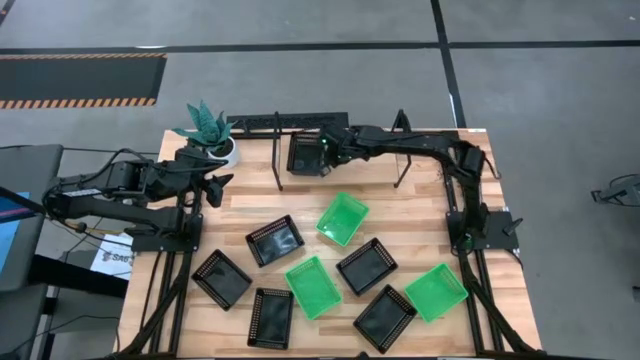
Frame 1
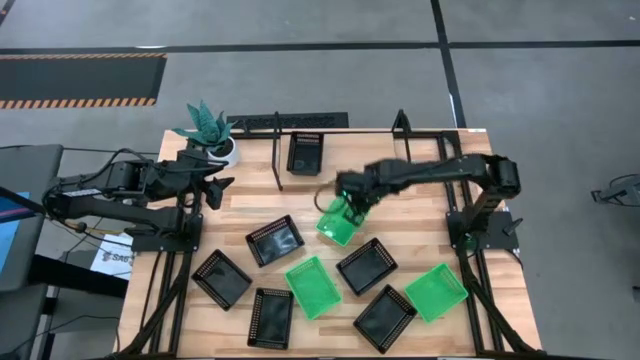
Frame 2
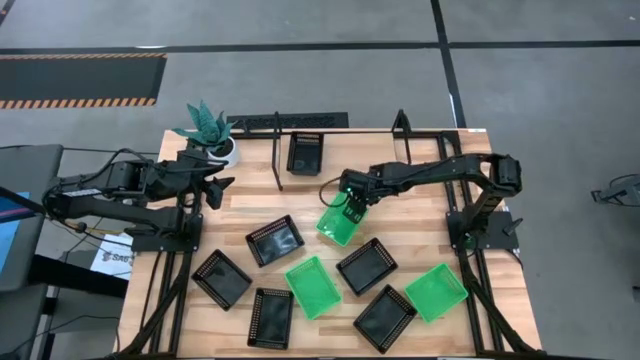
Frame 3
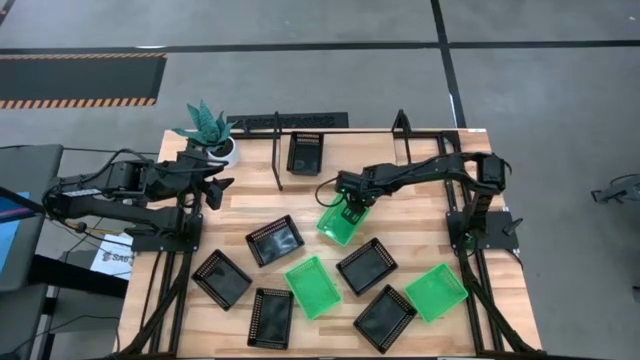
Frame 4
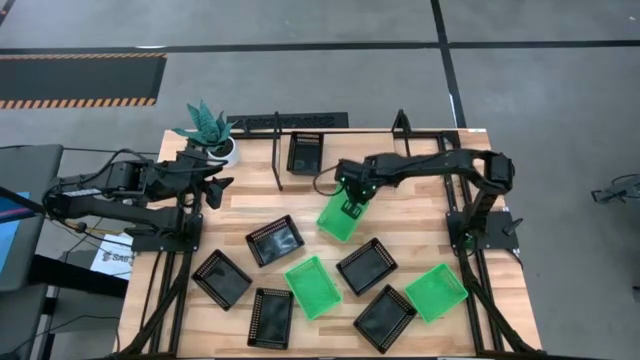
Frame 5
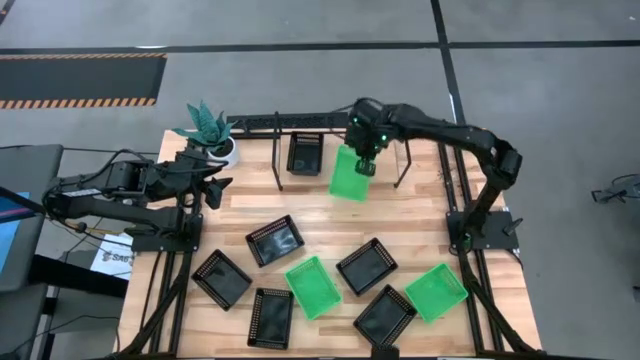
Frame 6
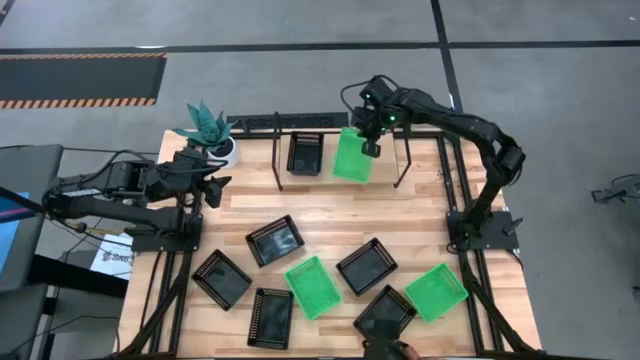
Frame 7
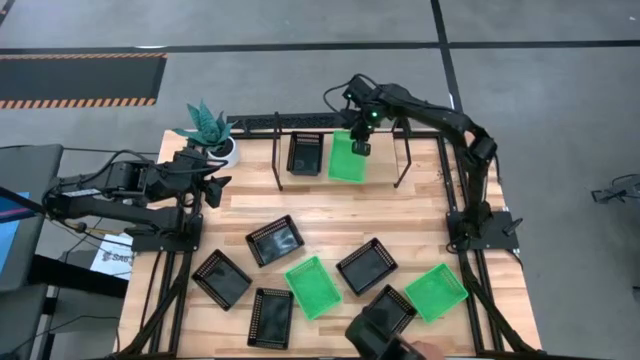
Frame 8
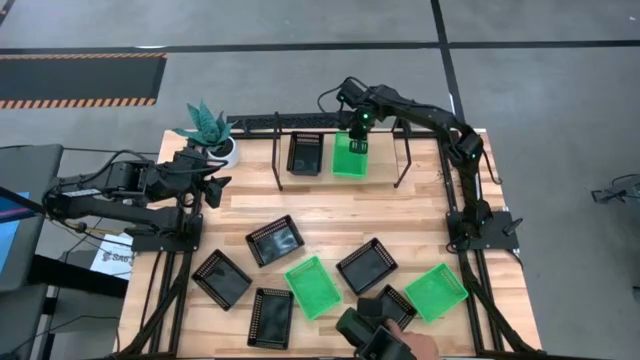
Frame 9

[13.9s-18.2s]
Task: Stack baskets on shelf by color
Put the green basket on the shelf

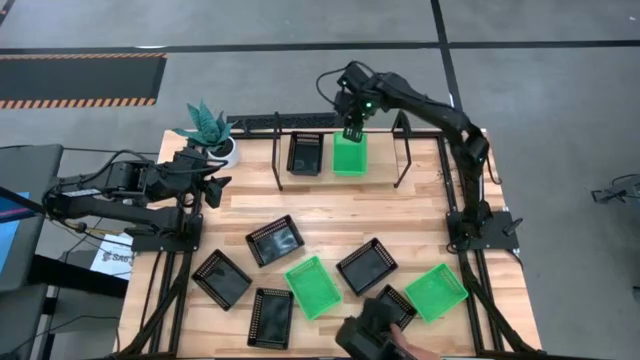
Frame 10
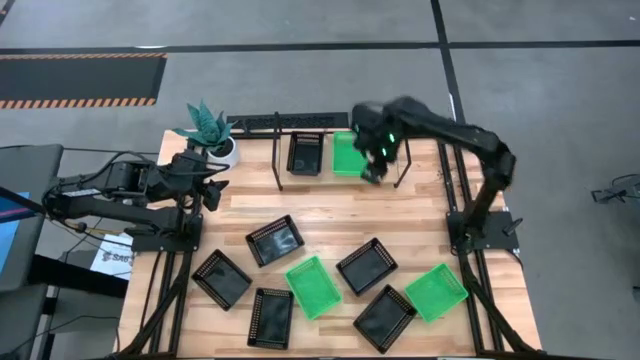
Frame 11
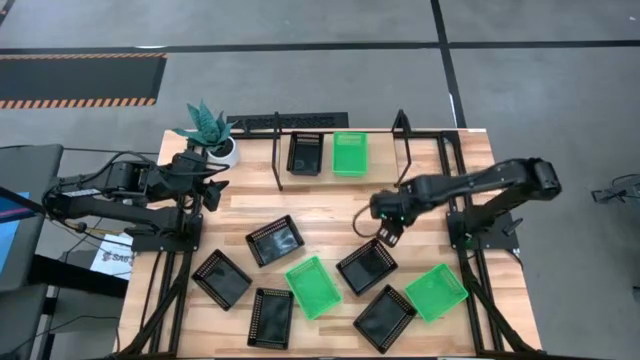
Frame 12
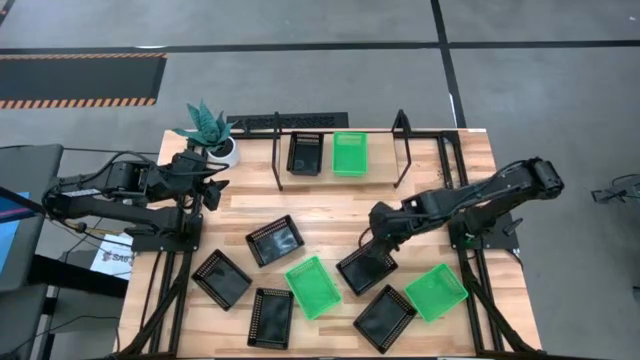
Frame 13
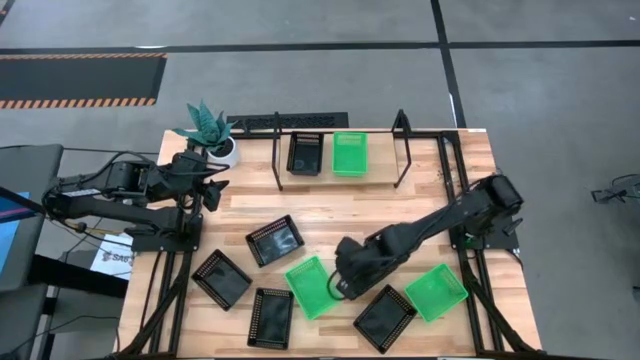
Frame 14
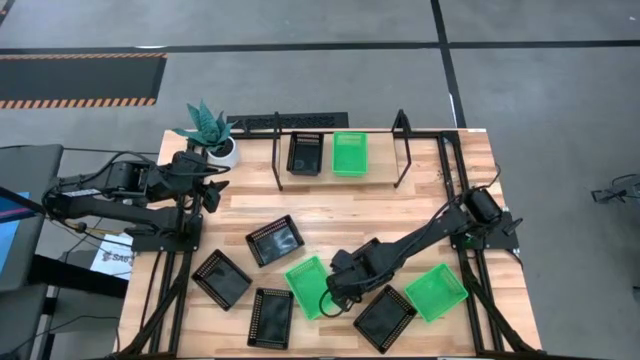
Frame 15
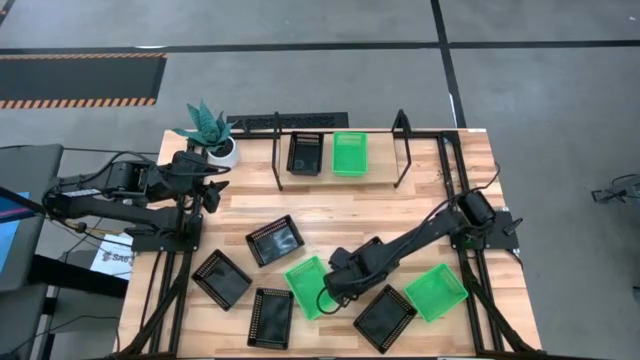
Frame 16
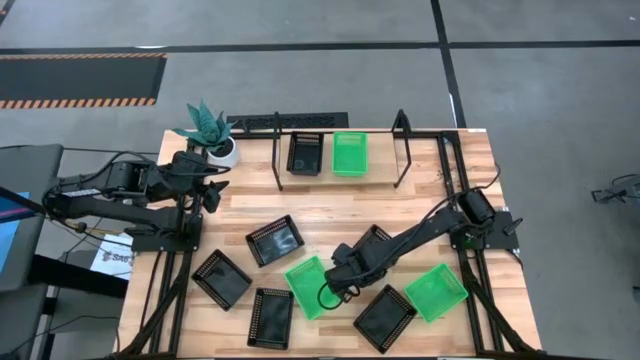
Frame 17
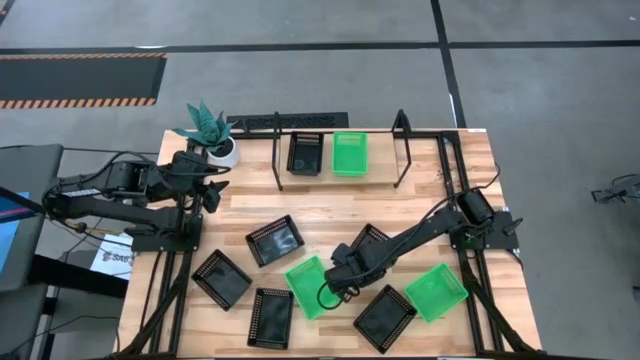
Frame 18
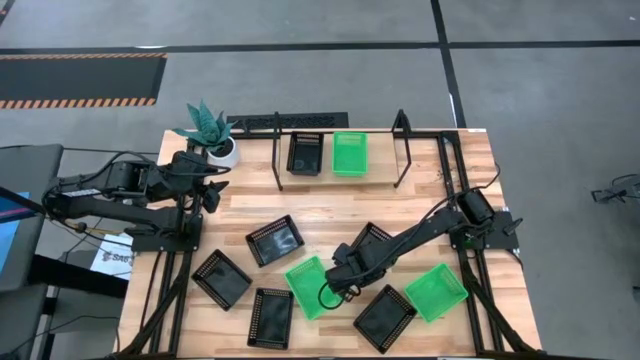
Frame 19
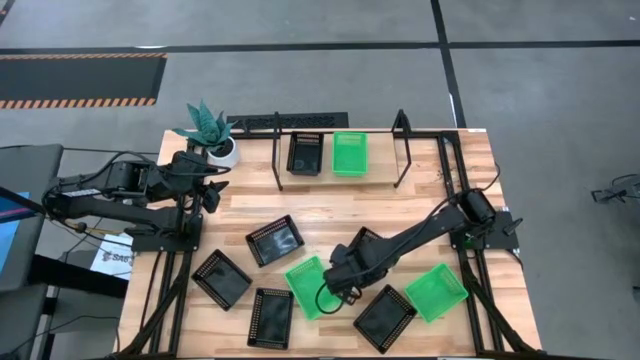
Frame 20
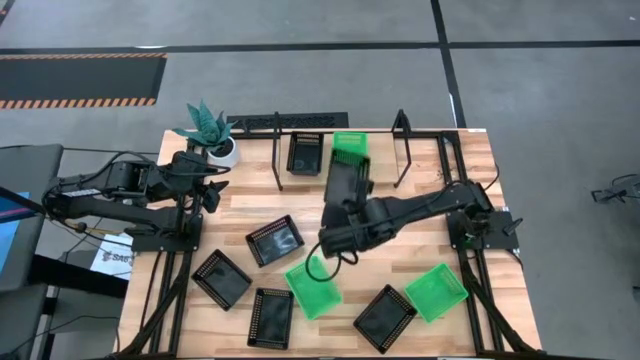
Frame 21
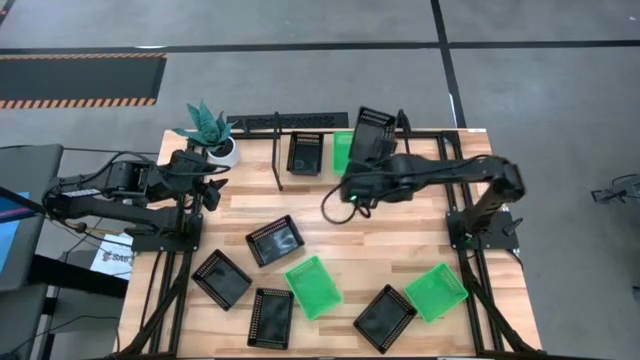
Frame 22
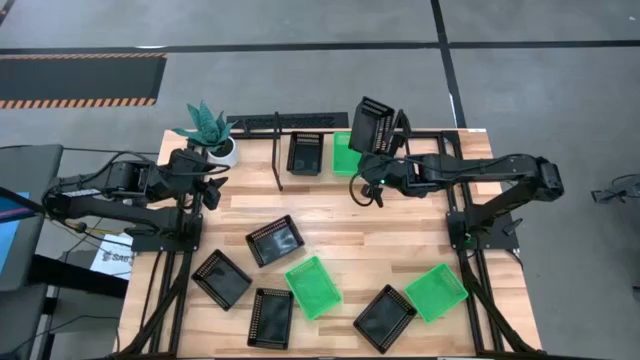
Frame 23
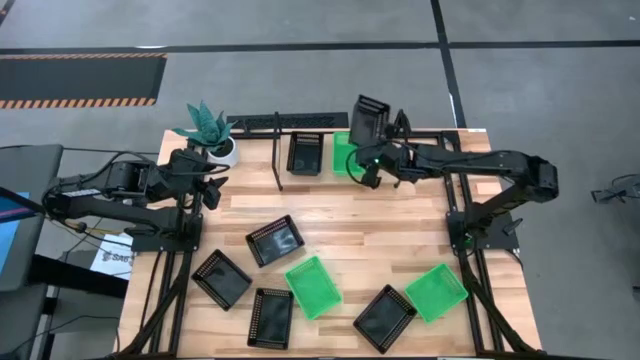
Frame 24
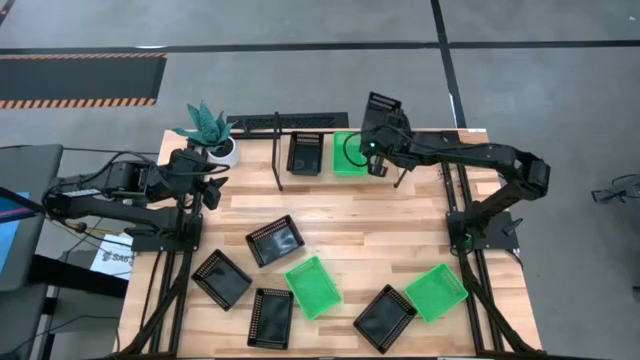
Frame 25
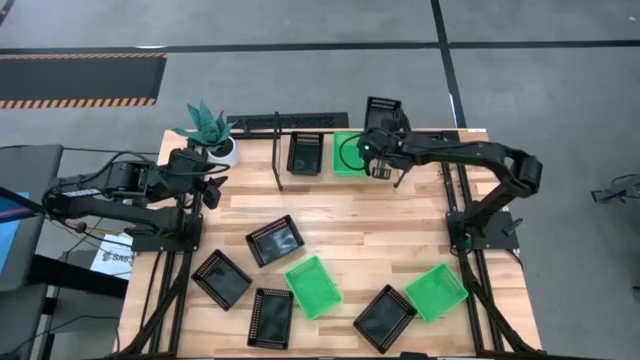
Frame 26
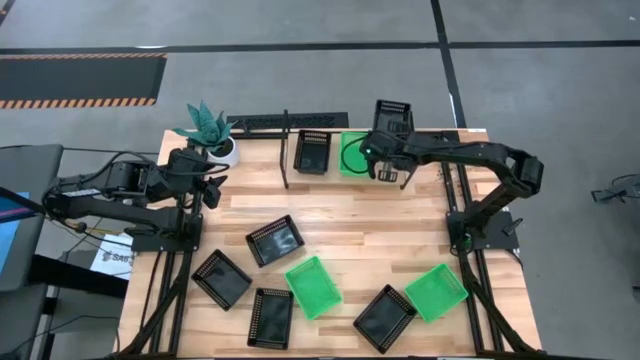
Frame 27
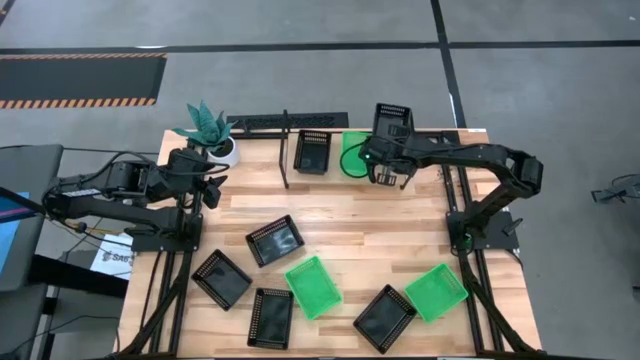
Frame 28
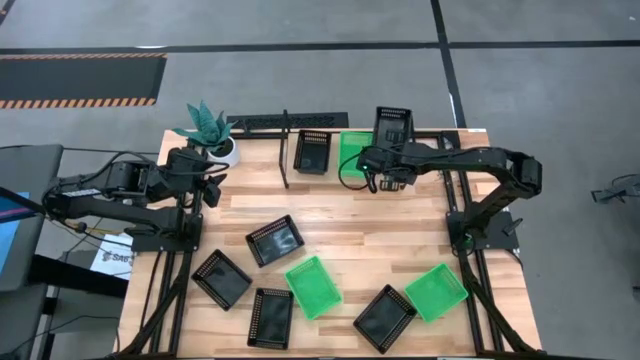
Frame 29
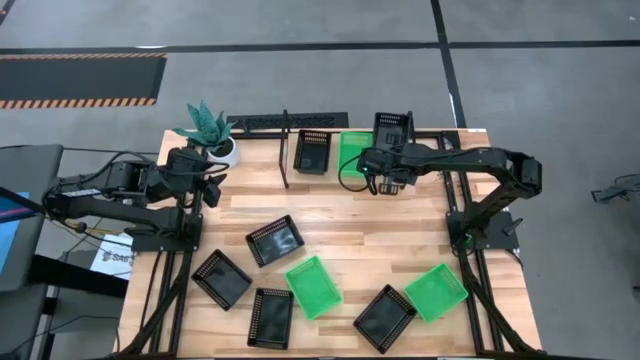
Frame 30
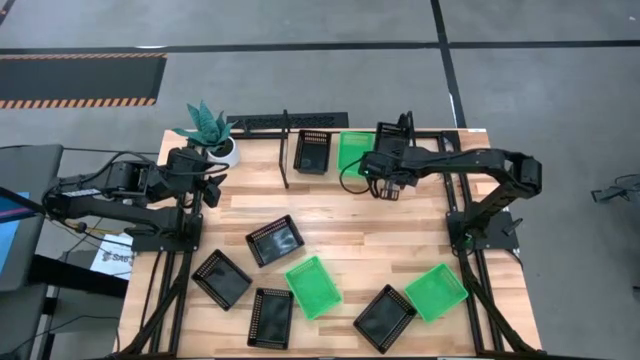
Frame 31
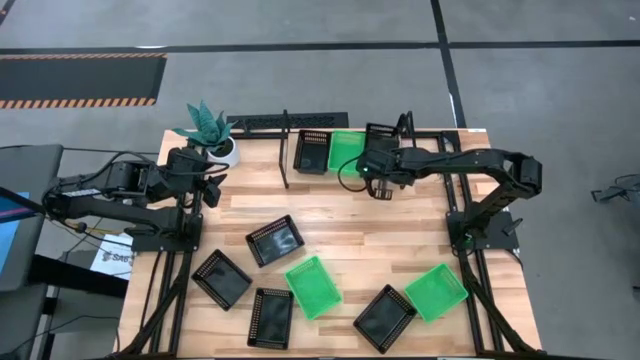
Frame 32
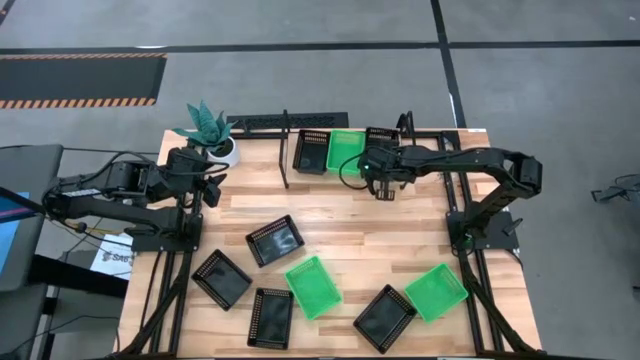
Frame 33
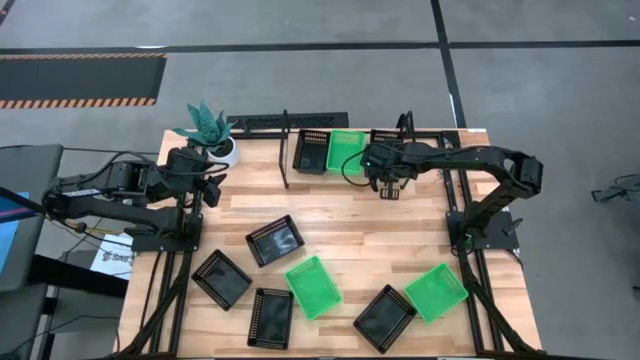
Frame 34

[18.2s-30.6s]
Put the black basket on the shelf

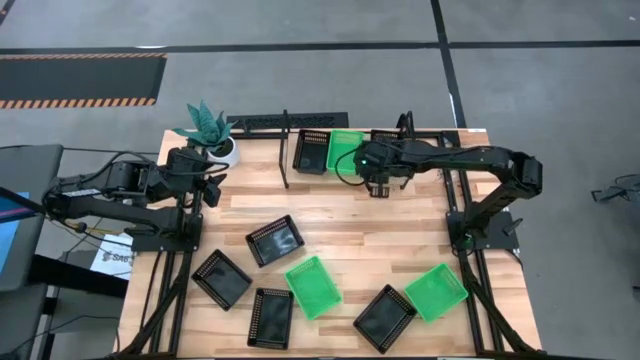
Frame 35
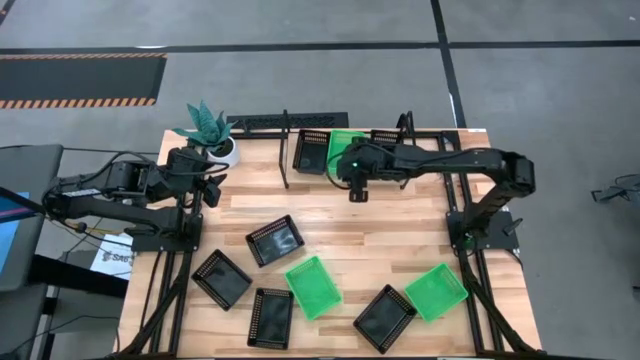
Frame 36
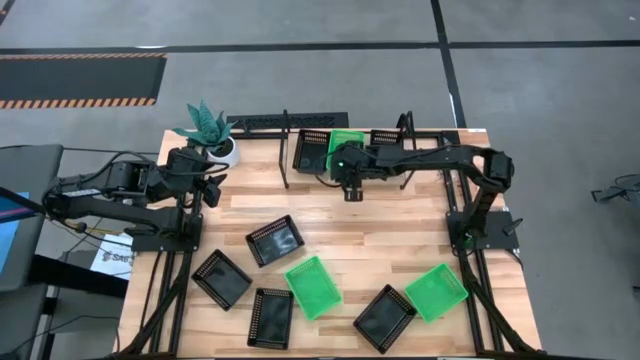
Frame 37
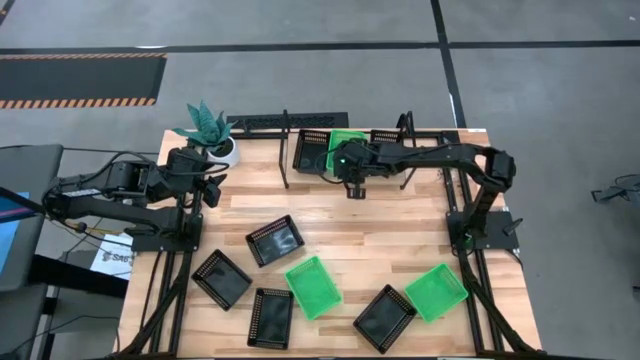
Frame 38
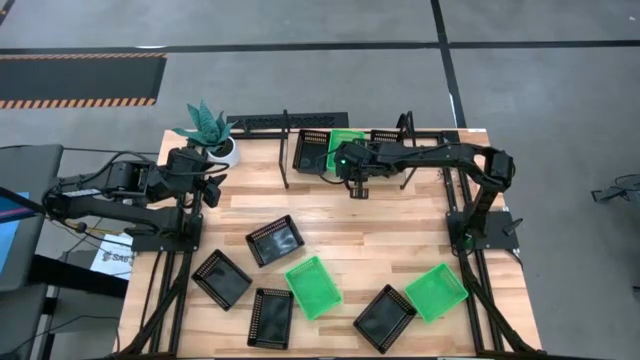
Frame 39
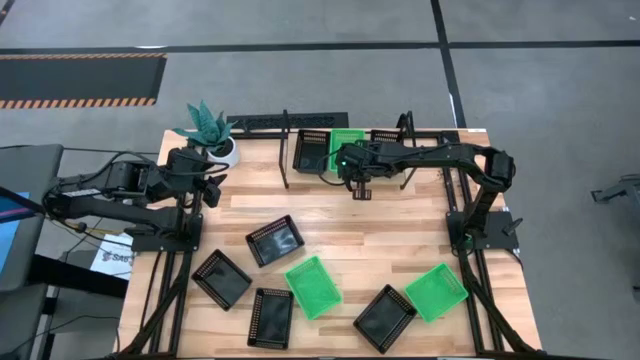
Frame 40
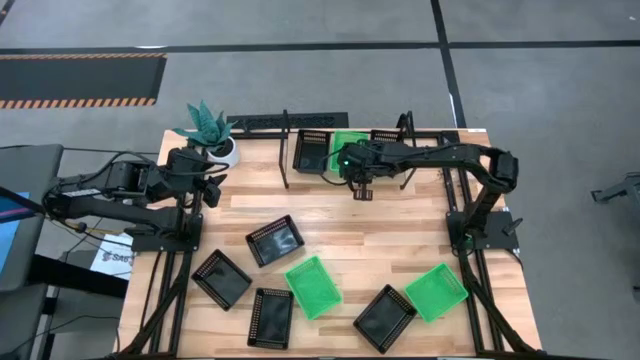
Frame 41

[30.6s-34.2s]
Adjust the green basket on top of the shelf
